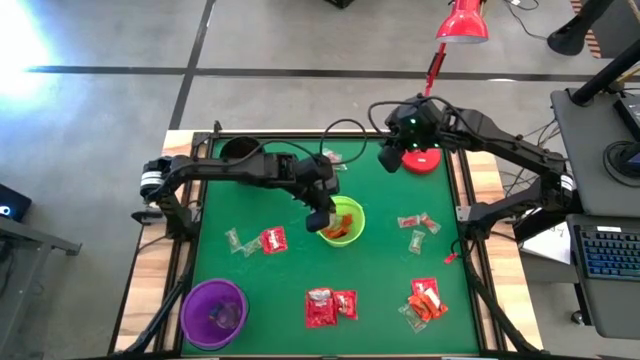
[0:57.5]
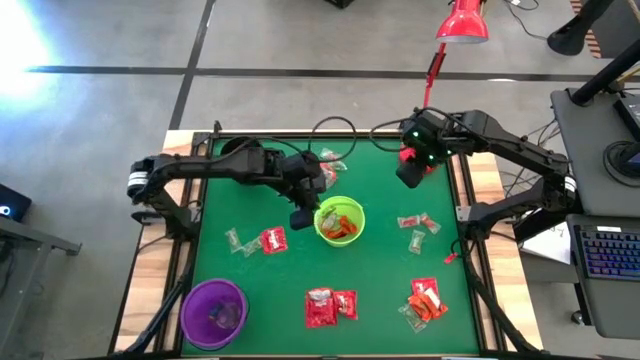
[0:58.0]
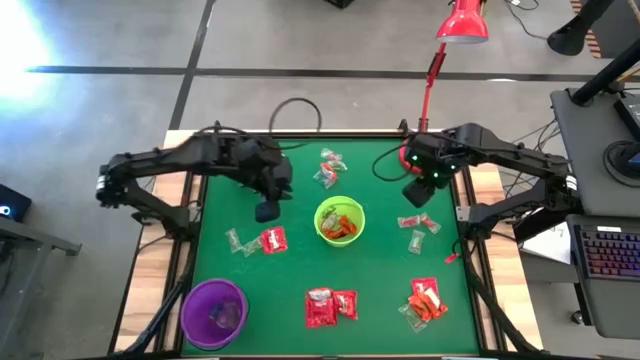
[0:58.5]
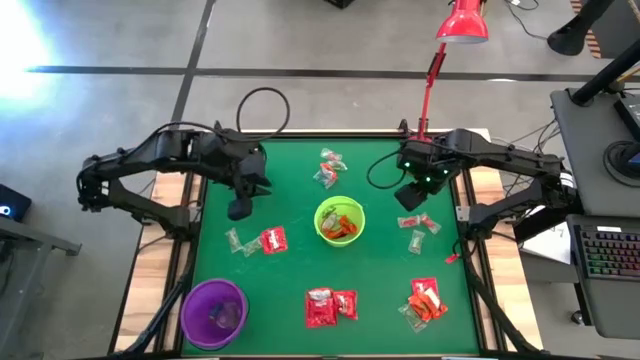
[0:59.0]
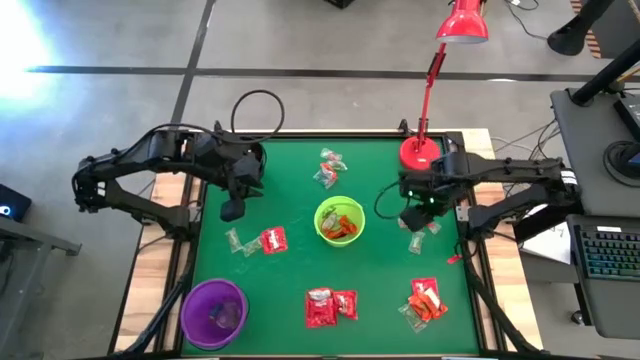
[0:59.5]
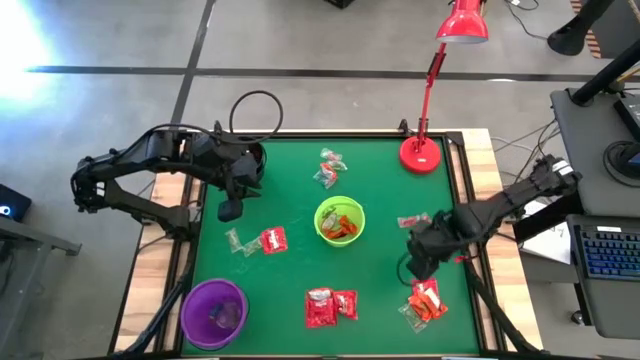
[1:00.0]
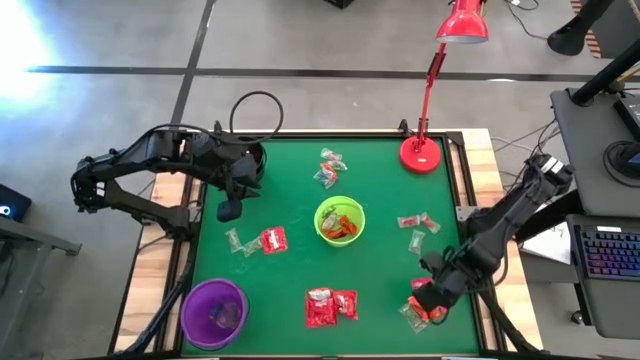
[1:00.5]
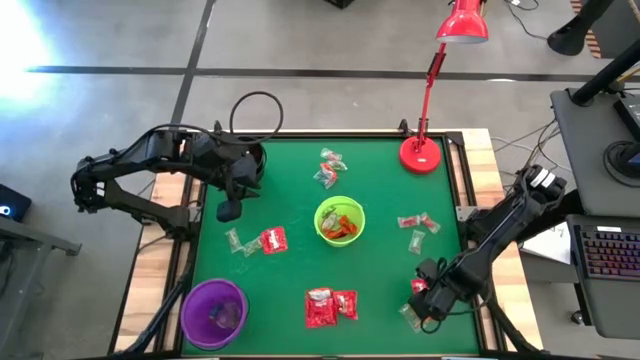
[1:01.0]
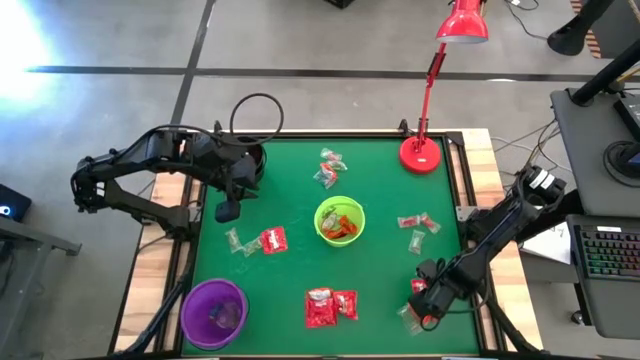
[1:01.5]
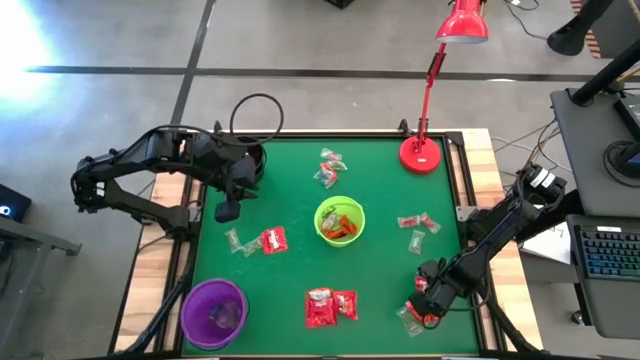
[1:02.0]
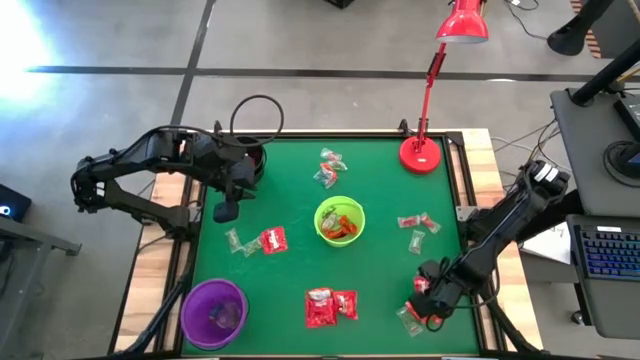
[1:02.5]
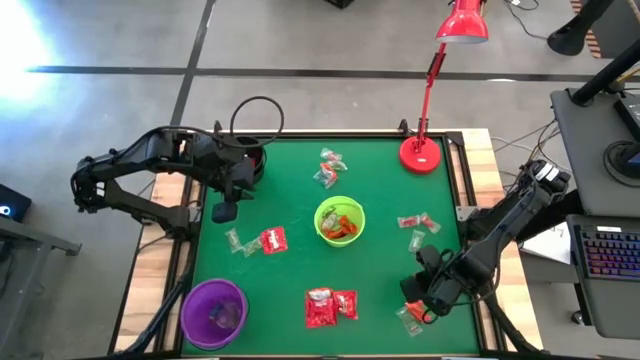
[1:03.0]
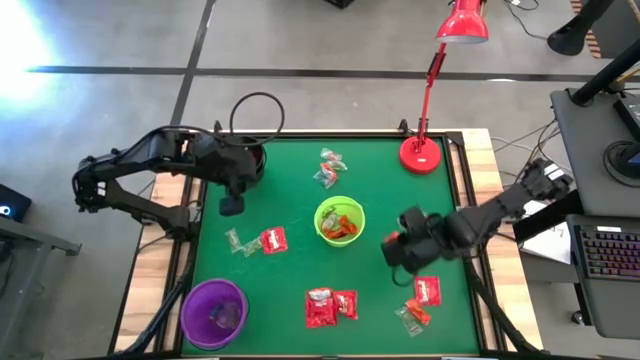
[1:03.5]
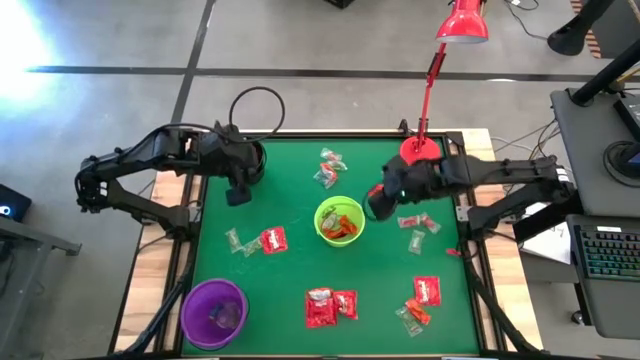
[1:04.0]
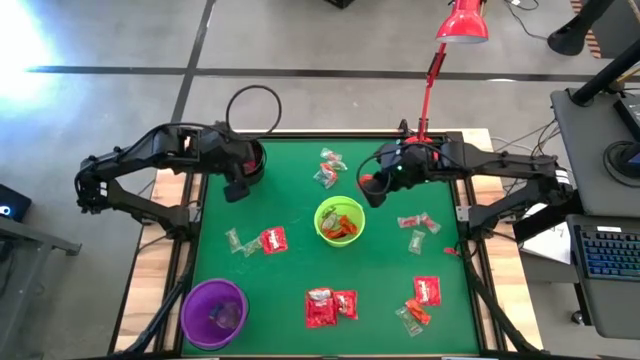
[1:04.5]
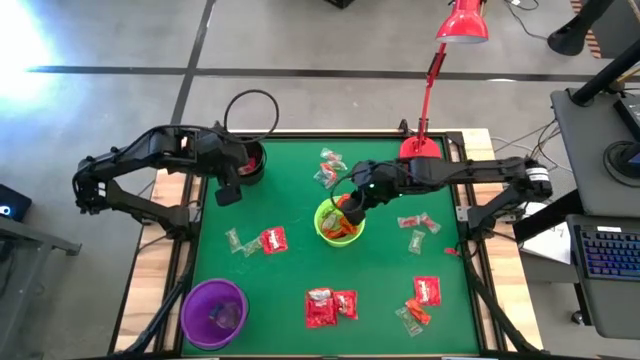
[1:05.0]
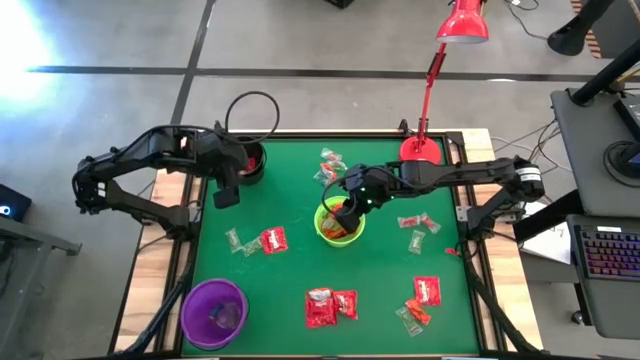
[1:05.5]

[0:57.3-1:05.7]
Task: Sort candy
Put the orange chocolate into the green bucket

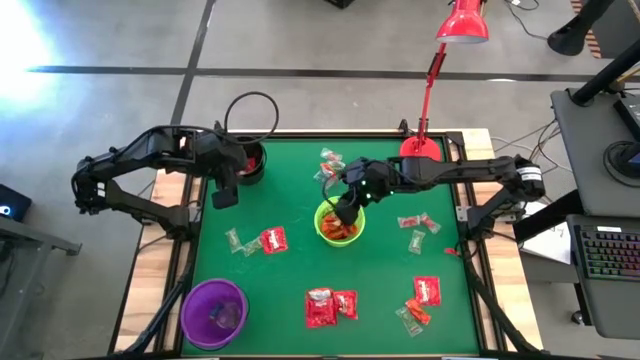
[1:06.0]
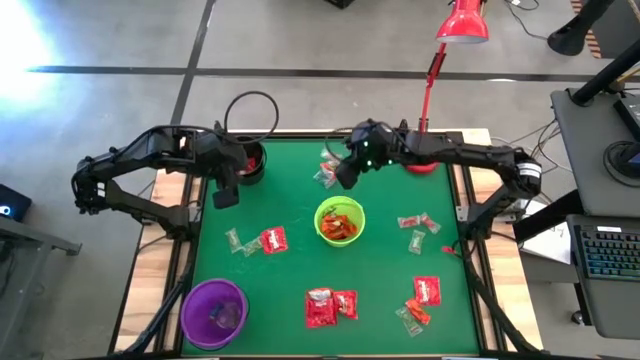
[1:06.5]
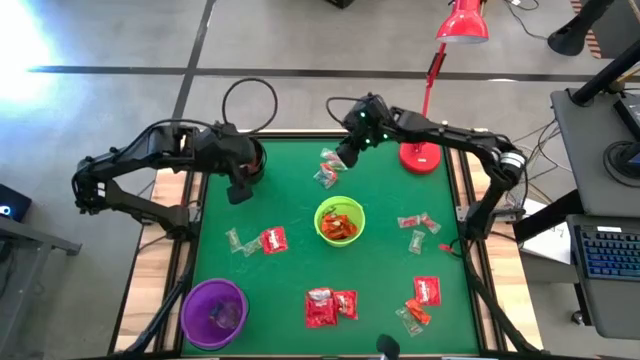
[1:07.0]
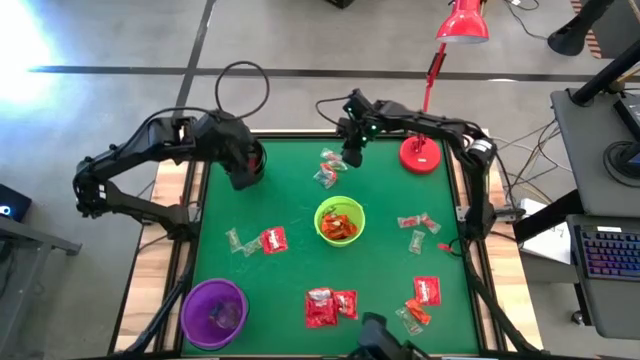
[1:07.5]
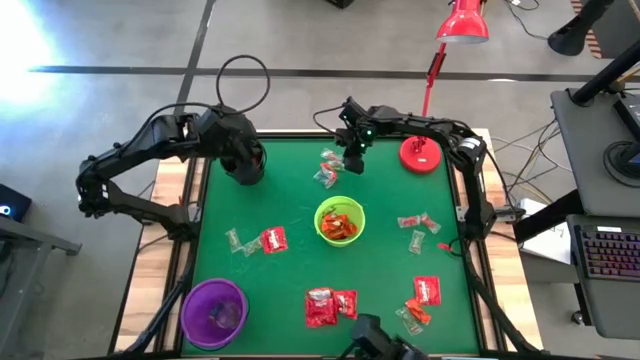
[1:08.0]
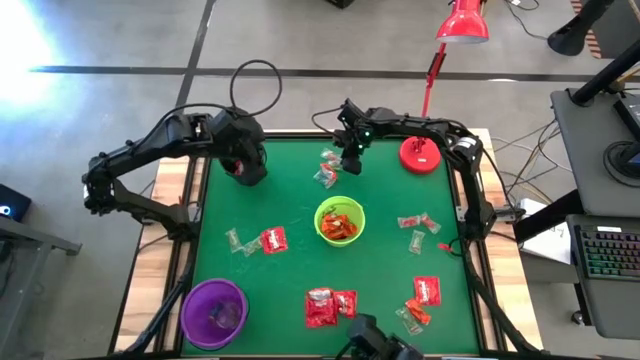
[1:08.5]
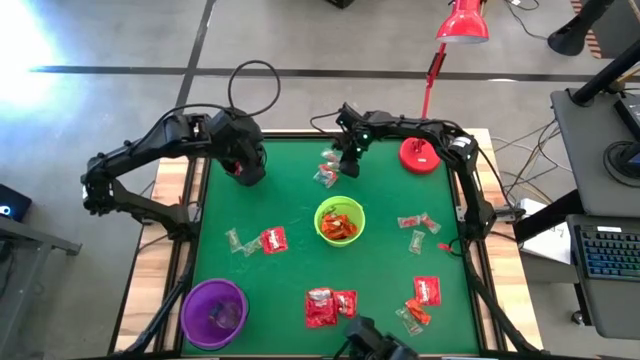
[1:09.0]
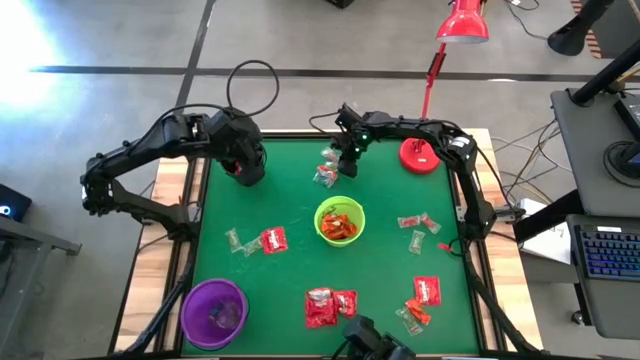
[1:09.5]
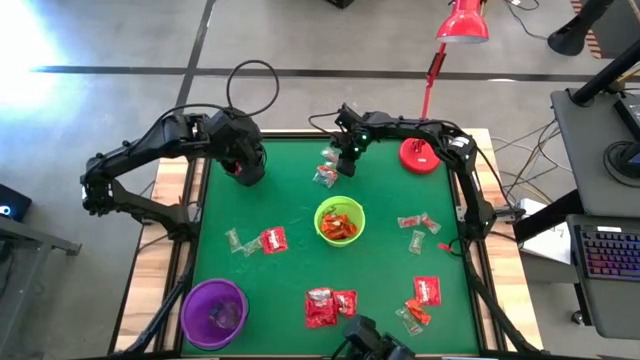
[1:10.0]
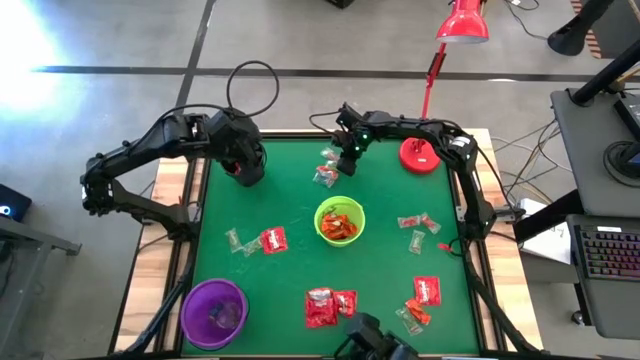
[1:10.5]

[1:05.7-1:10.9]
Put the green gummy into the purple bucket

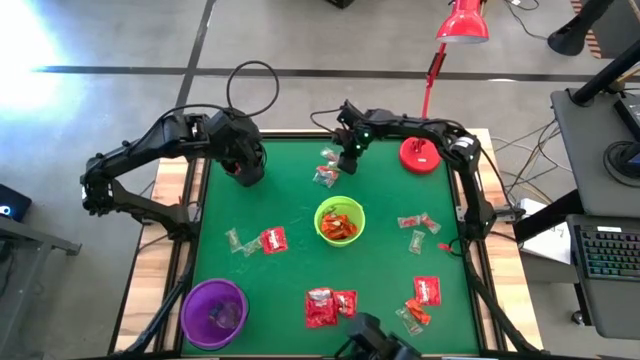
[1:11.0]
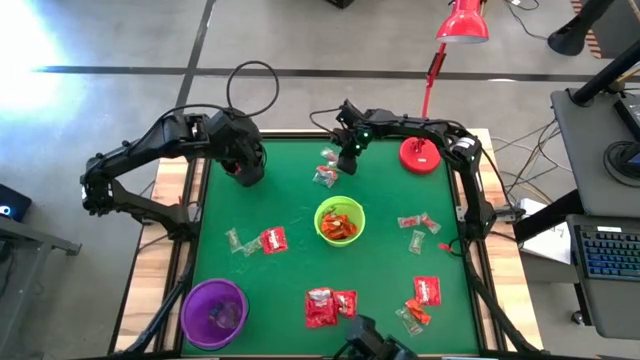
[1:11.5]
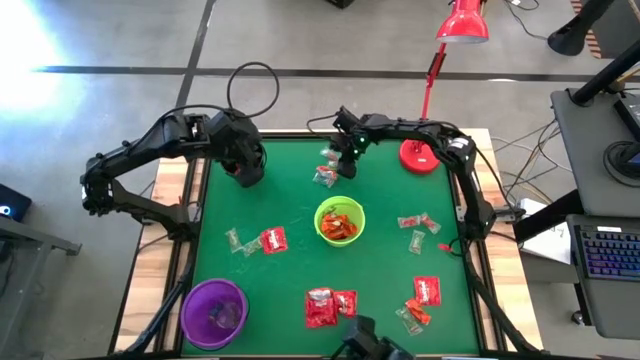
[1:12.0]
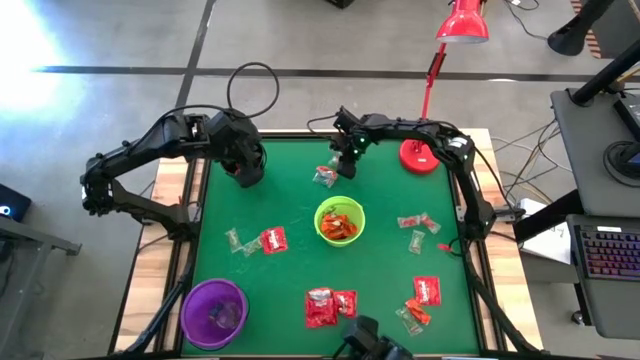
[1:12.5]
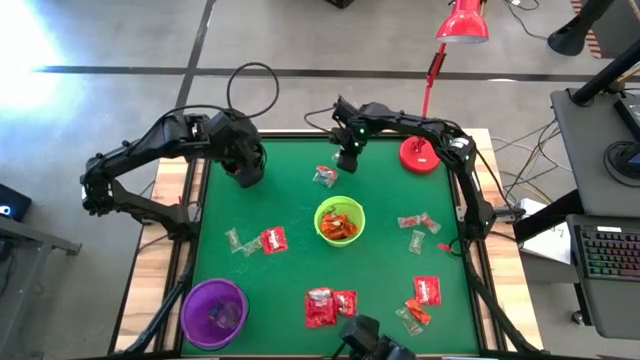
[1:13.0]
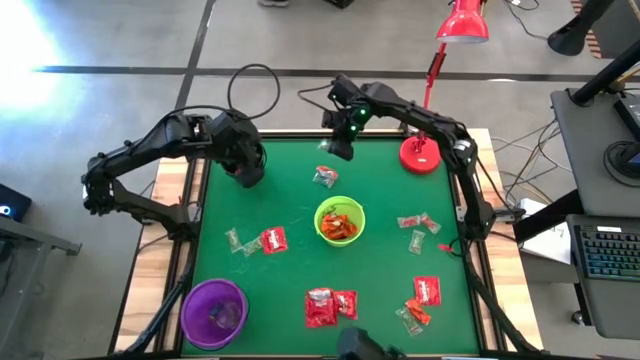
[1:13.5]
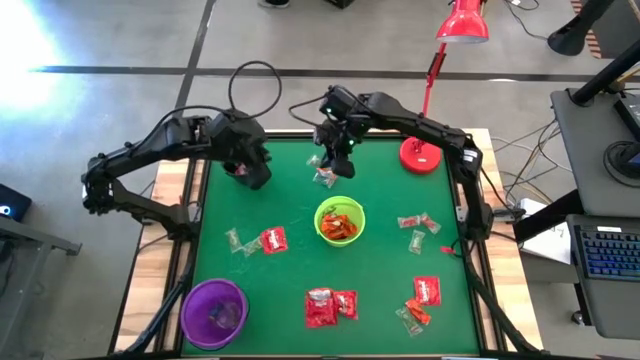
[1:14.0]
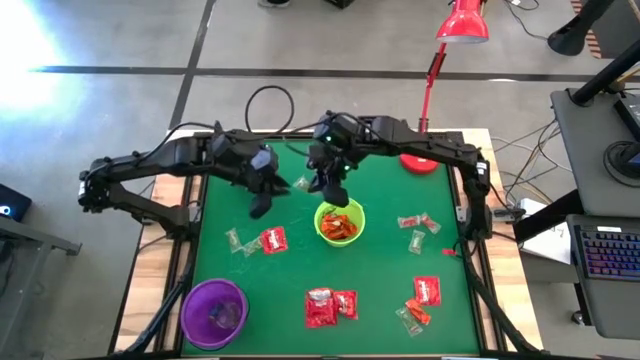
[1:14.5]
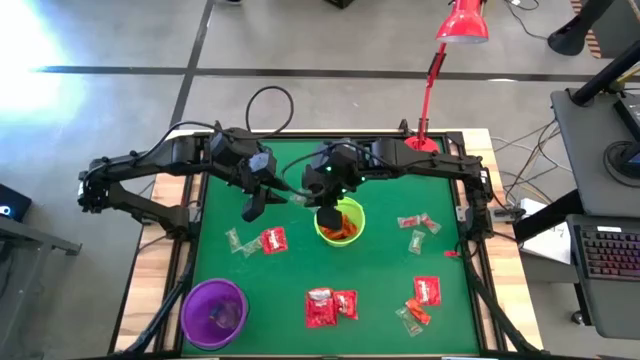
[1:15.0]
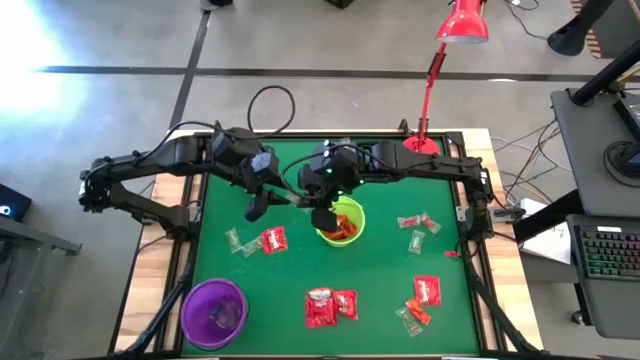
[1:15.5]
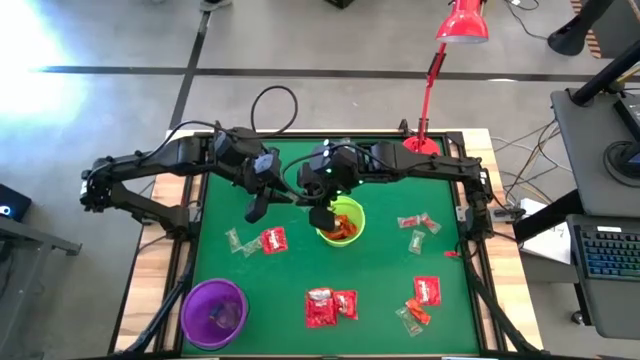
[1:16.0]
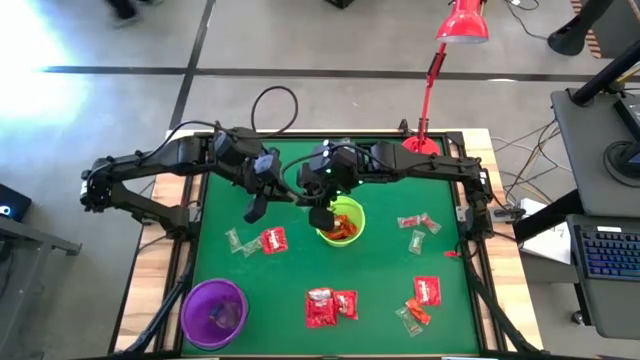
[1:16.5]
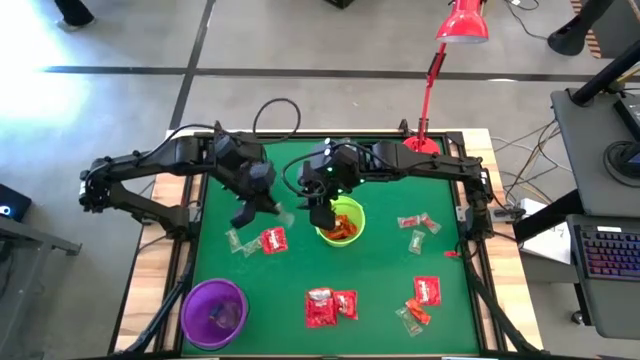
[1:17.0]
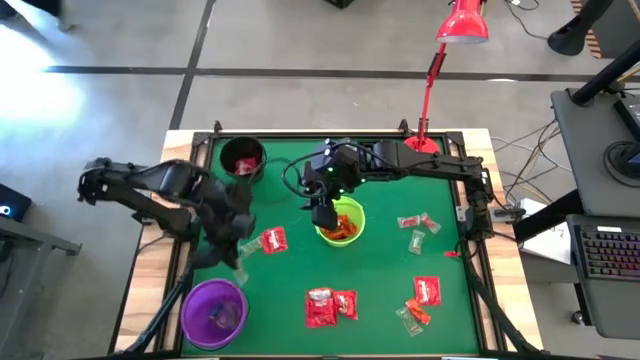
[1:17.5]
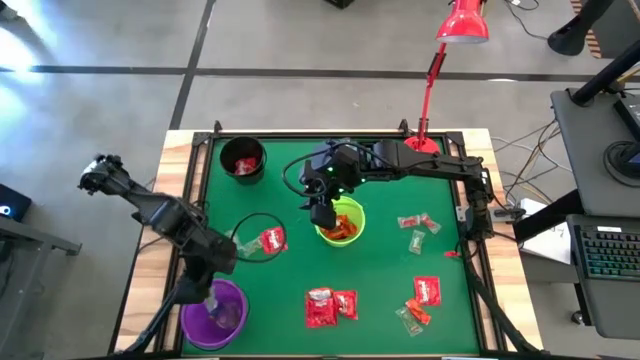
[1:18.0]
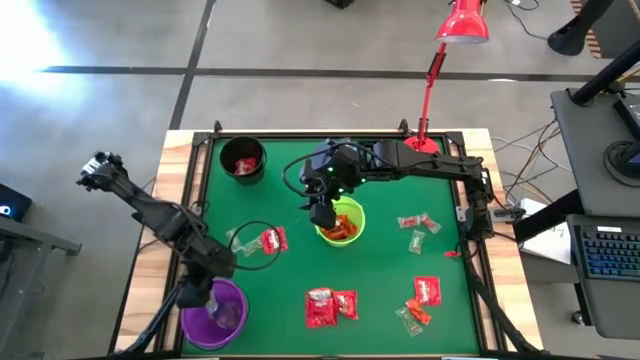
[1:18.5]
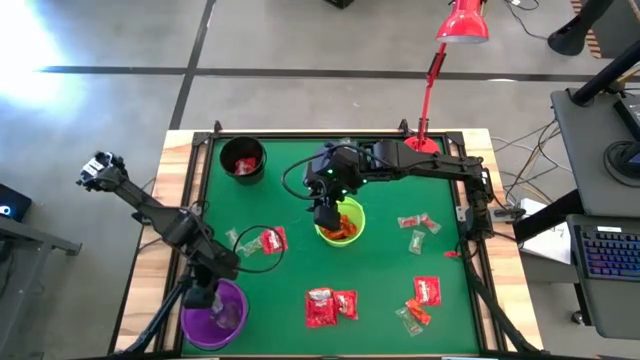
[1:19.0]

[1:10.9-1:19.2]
Put the green gummy into the purple bucket
